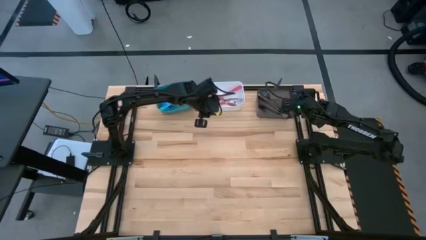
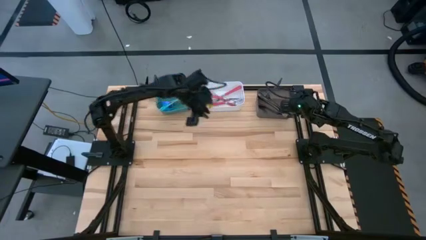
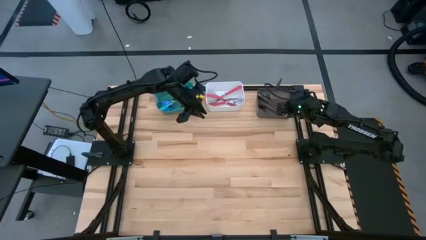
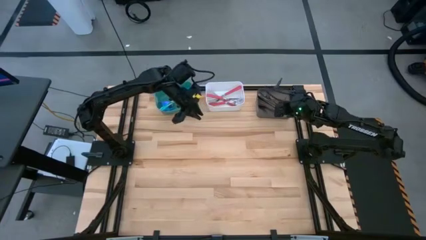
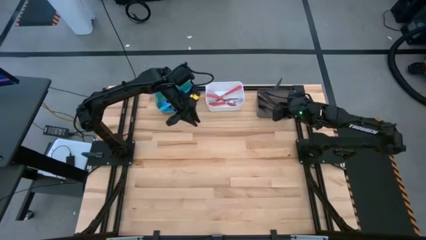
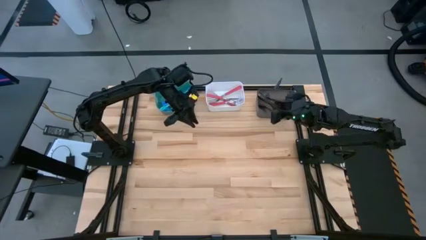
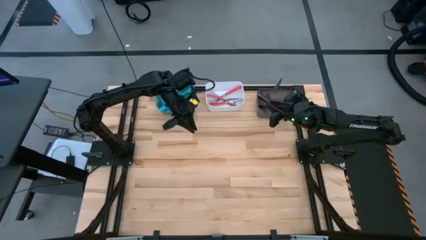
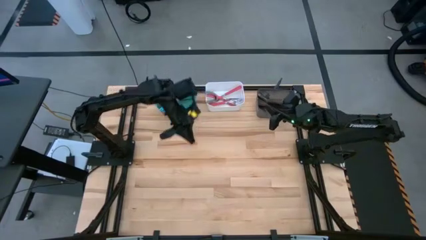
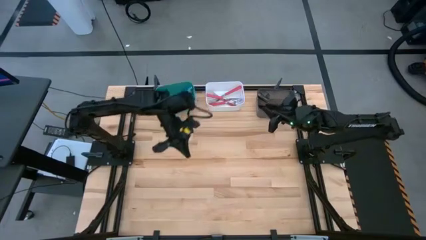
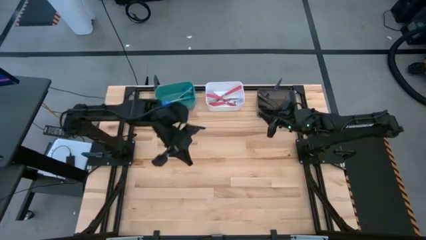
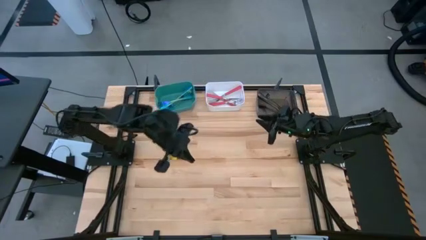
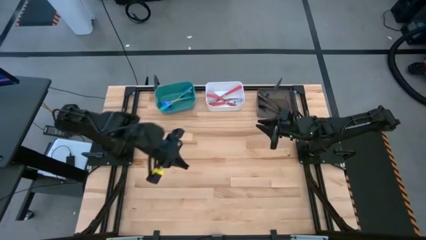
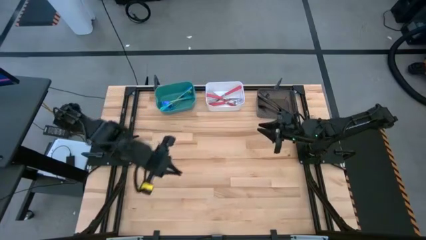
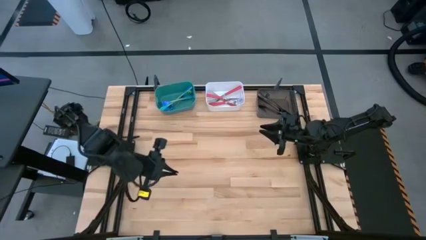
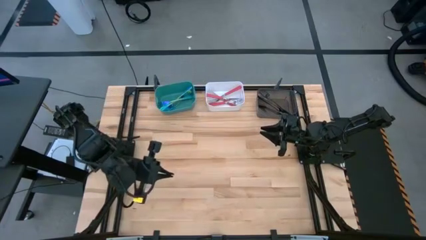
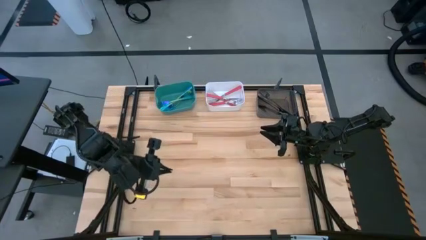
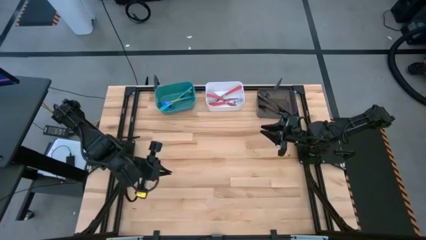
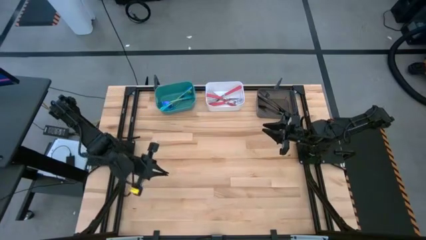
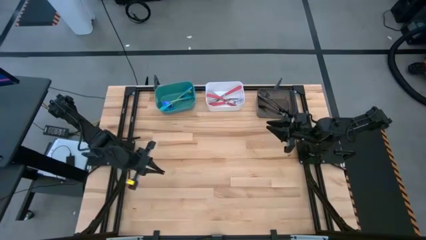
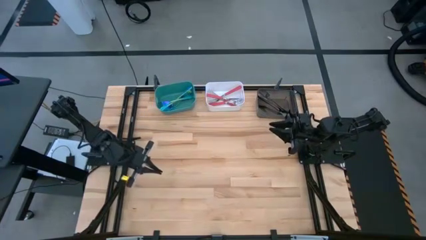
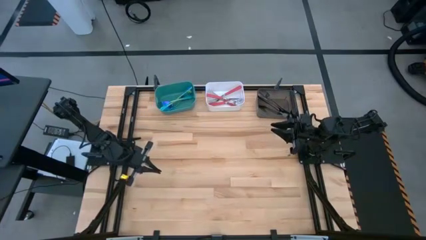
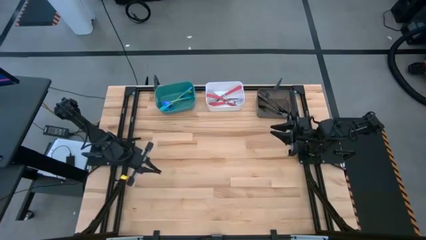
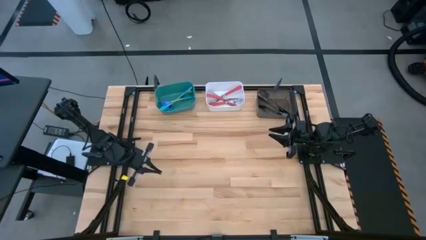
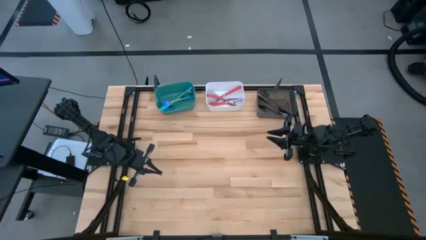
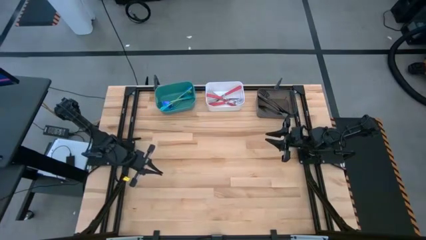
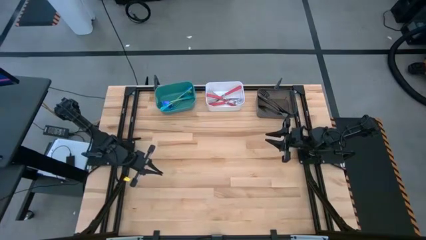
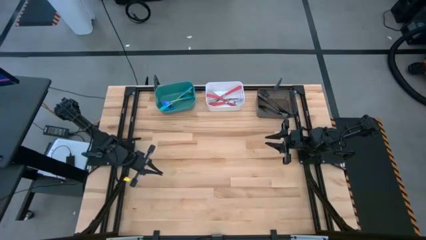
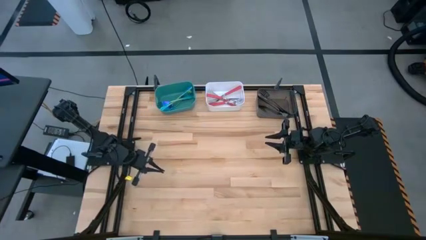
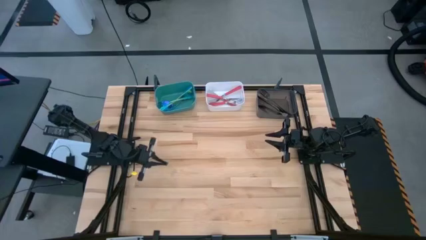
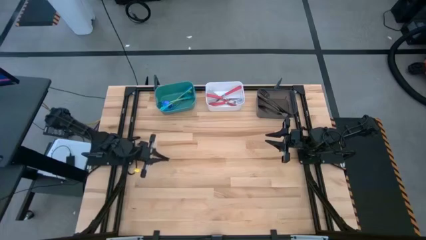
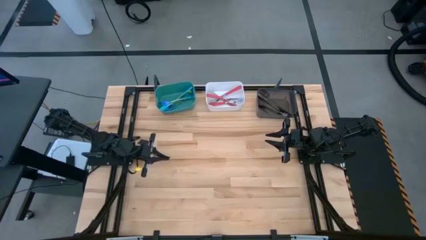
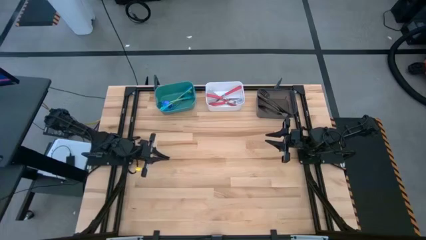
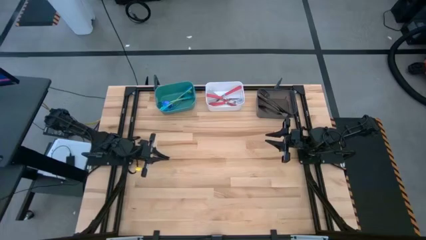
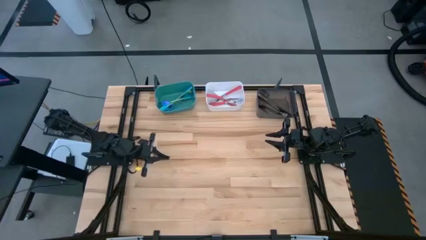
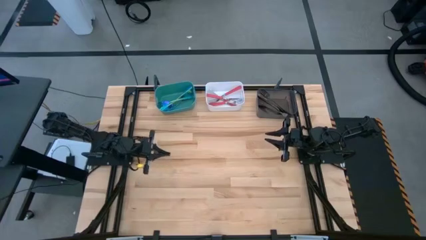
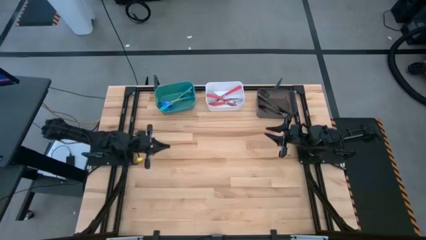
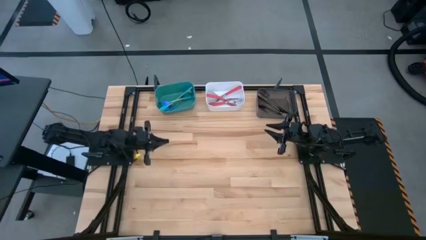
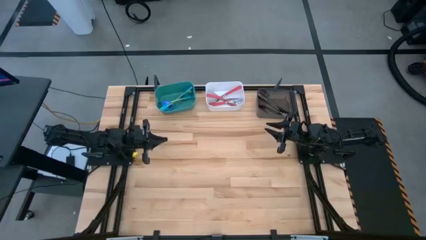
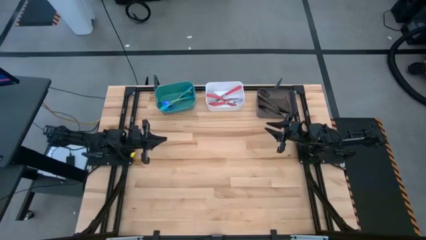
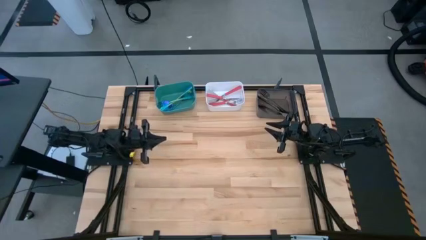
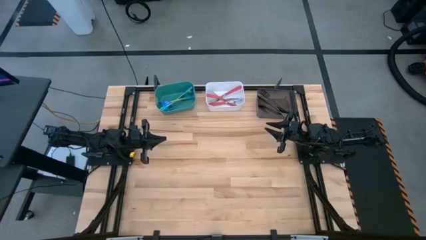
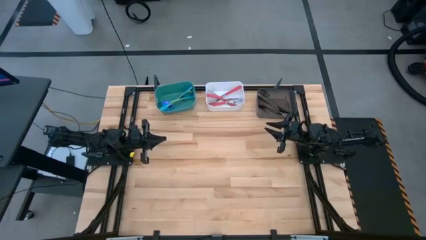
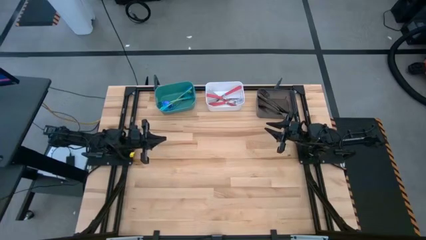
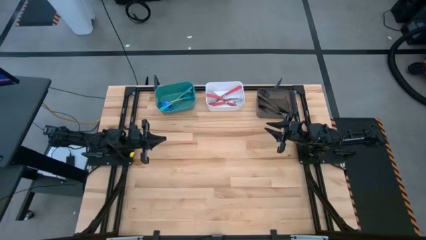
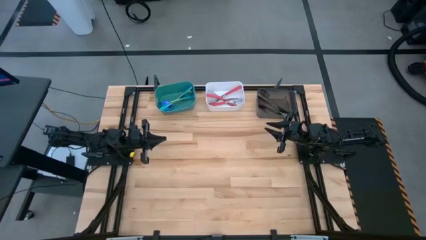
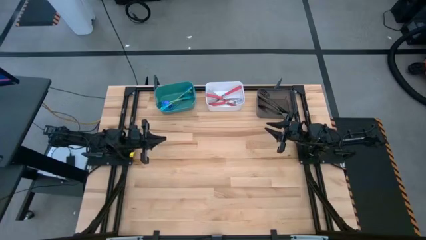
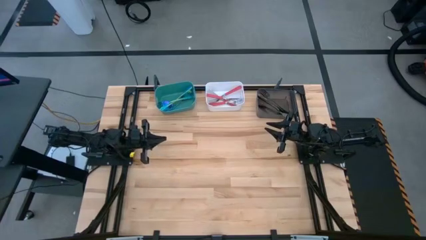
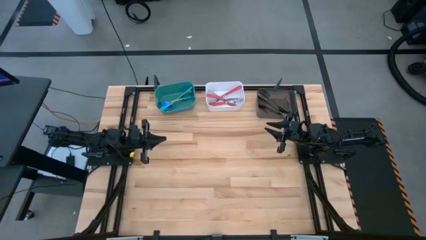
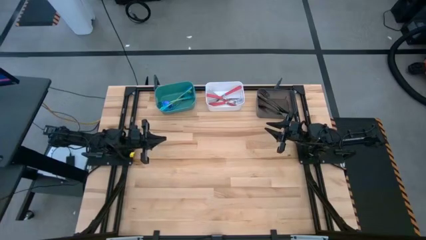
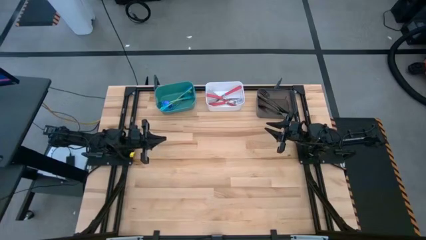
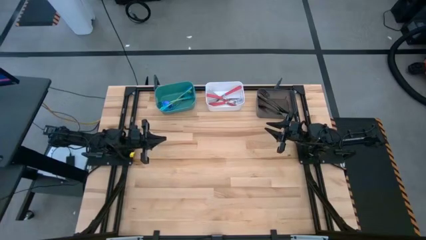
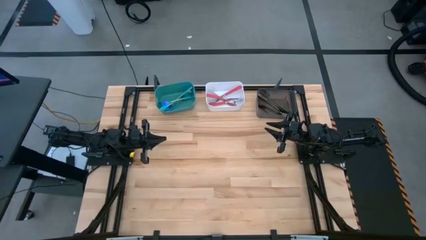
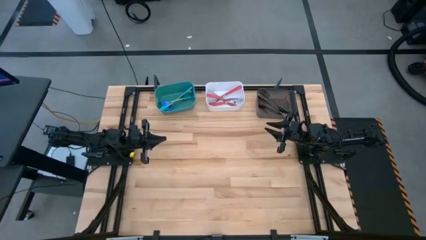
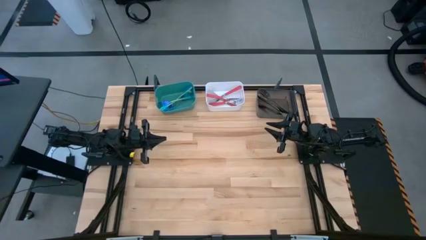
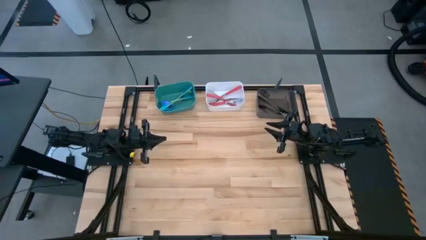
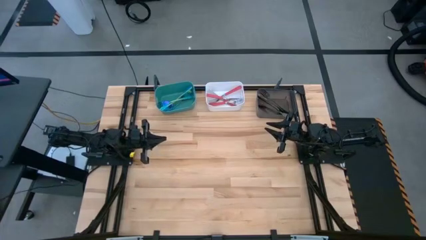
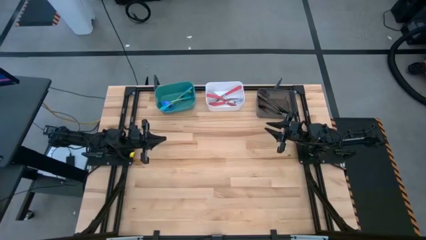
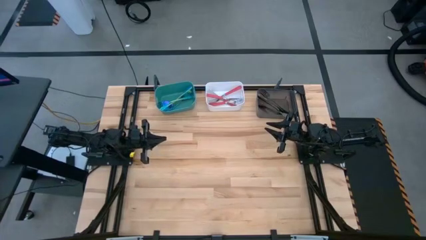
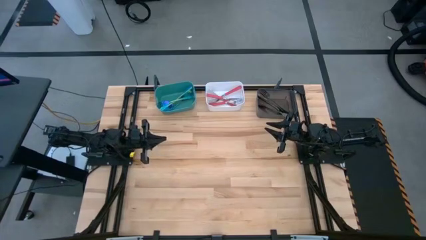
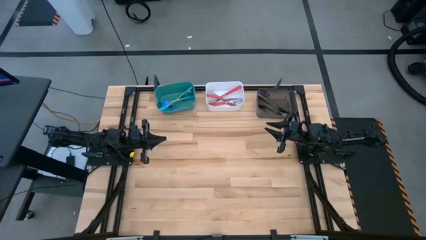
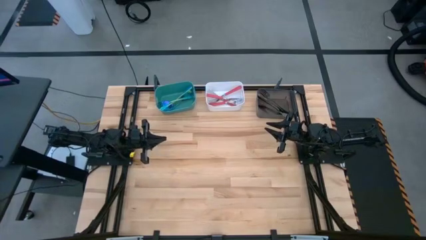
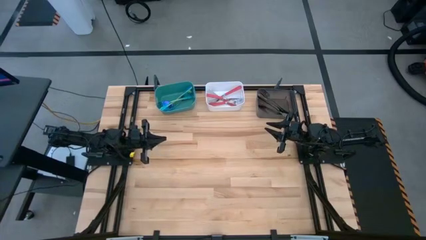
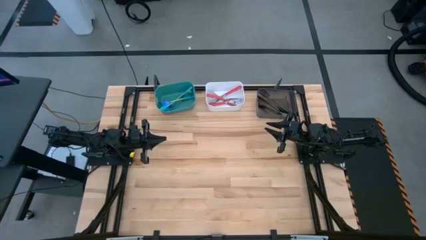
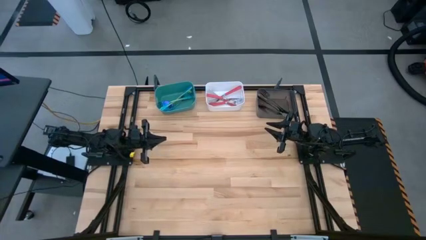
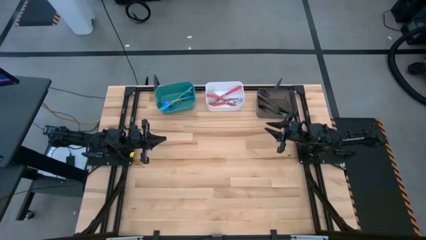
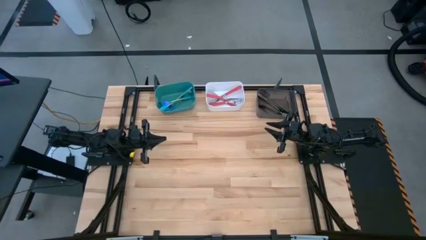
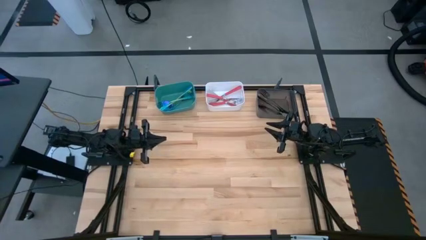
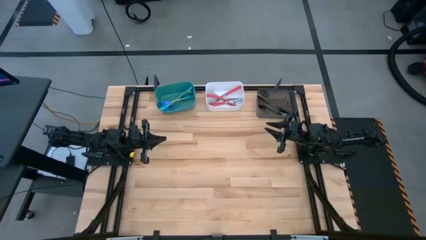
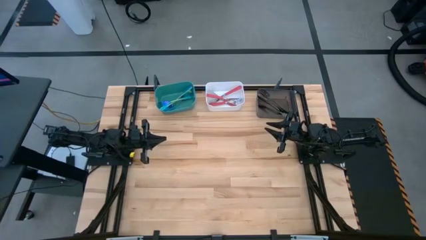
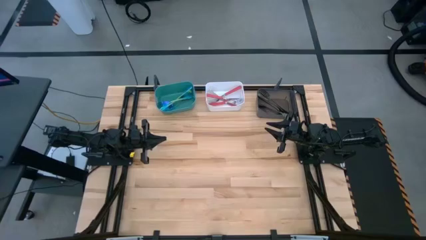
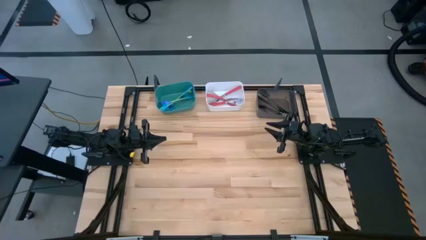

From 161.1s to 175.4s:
Task: Sort silverware by color (type)
Return to Home Position
